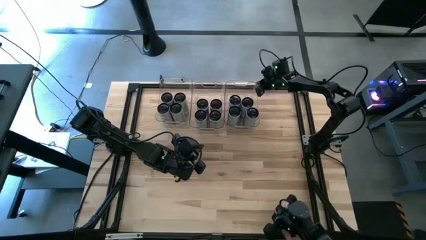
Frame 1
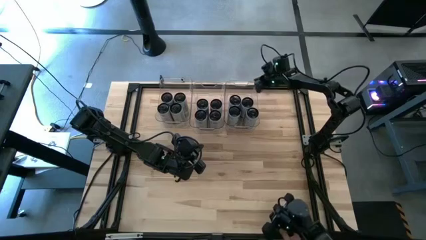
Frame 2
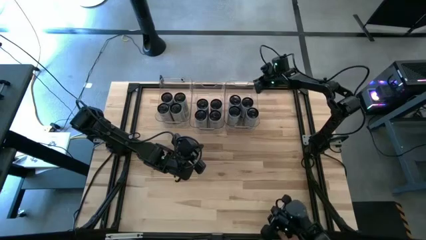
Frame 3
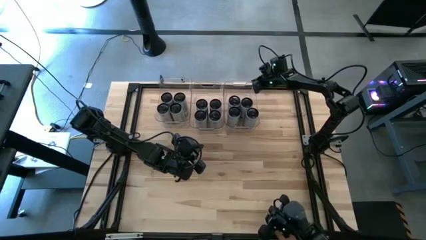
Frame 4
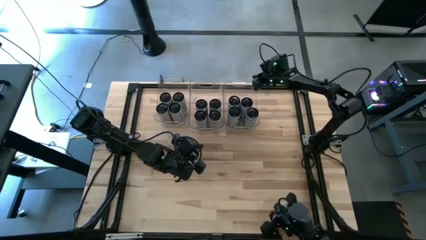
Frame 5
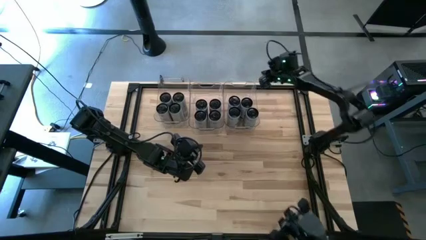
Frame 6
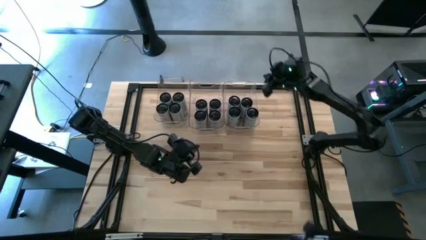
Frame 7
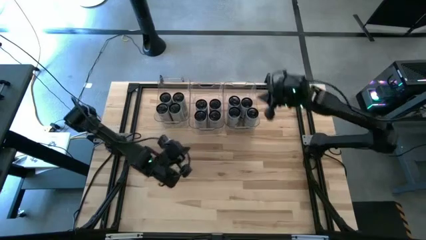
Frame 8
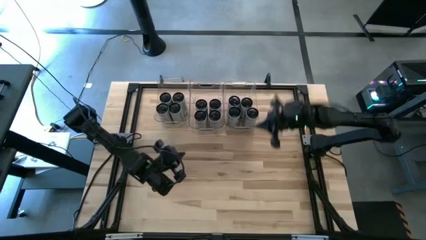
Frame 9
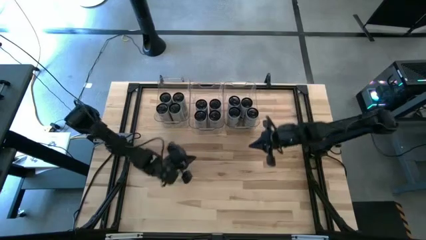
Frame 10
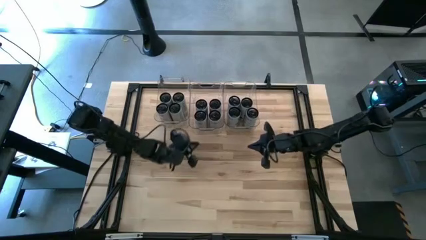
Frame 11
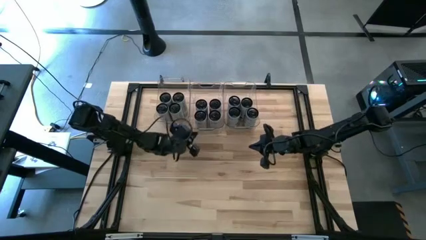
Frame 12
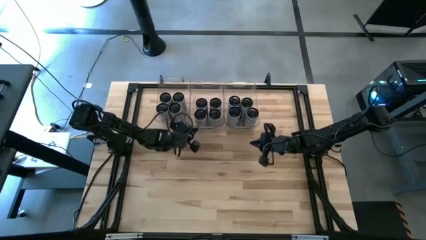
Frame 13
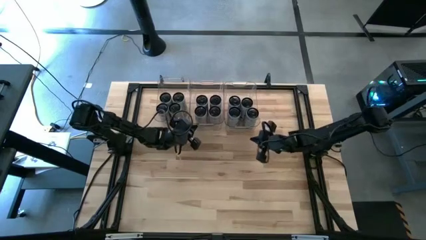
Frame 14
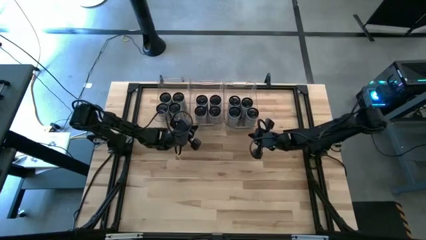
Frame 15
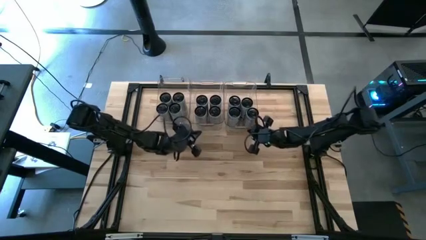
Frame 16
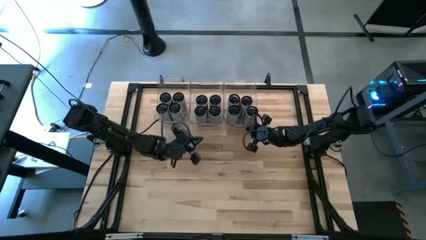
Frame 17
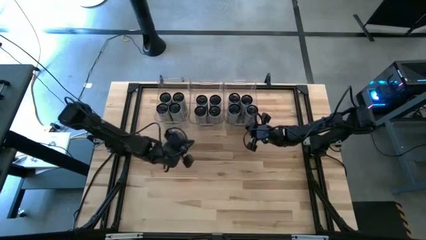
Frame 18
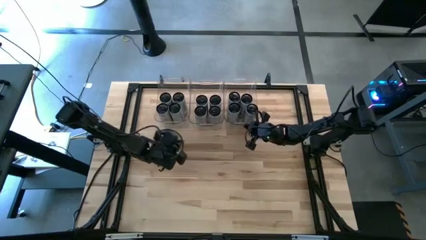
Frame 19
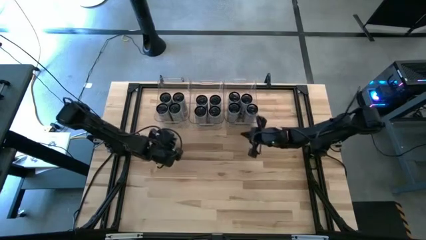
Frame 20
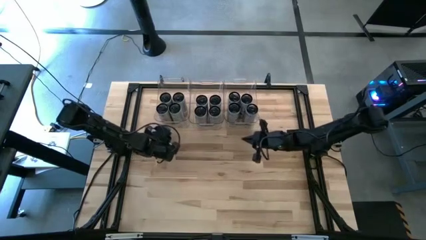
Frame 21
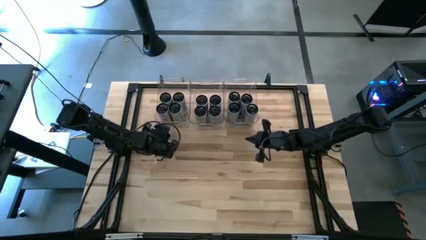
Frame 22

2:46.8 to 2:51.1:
Task: Sort soda cans
Adjust the transparent bins

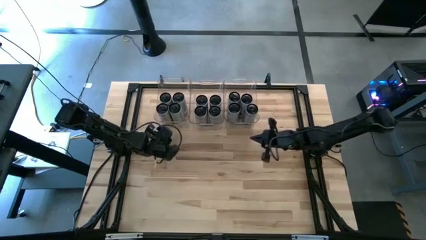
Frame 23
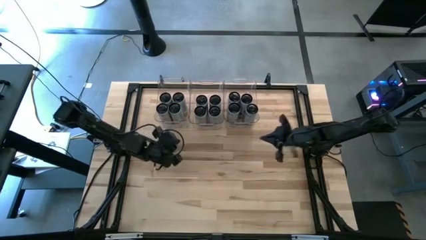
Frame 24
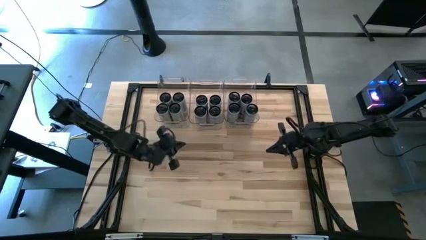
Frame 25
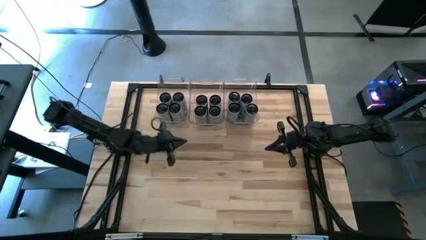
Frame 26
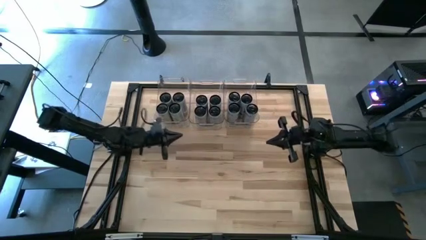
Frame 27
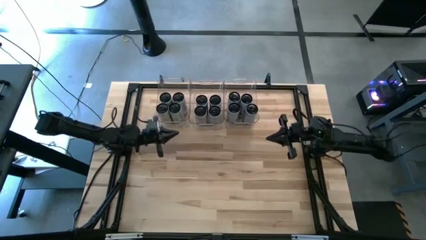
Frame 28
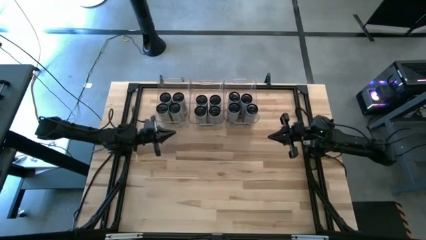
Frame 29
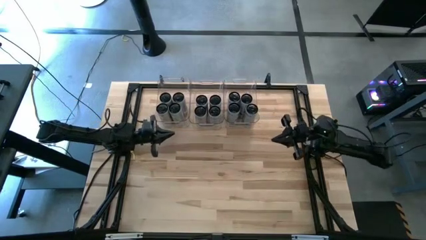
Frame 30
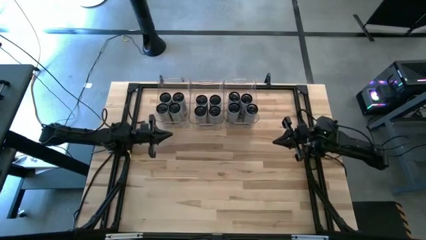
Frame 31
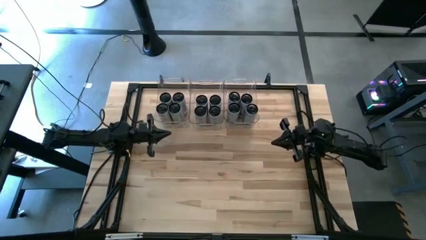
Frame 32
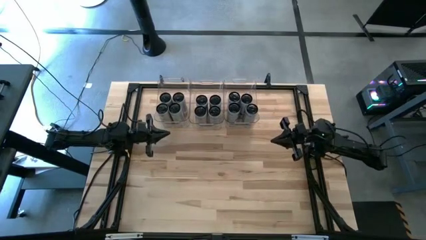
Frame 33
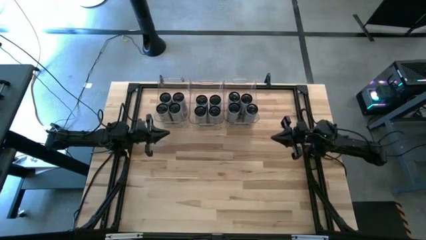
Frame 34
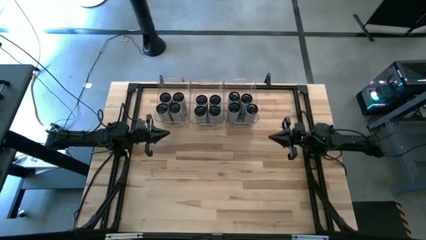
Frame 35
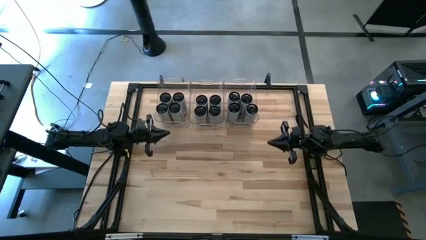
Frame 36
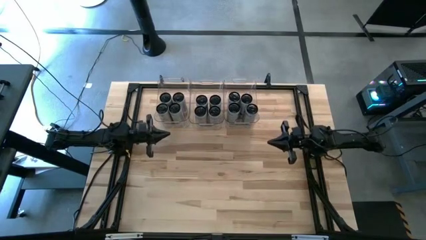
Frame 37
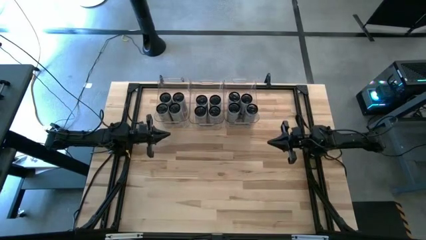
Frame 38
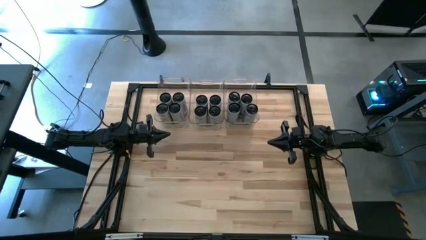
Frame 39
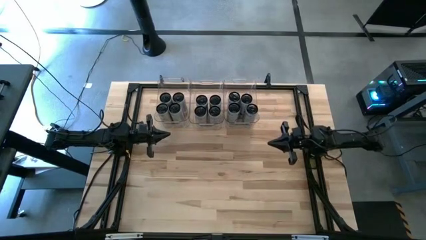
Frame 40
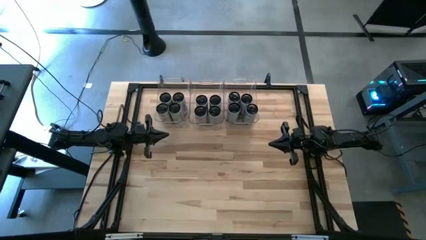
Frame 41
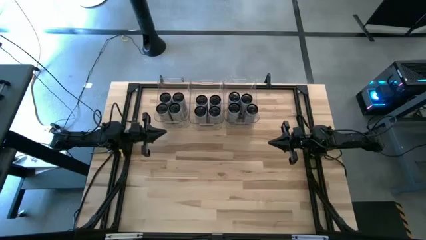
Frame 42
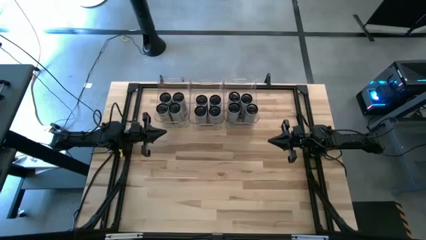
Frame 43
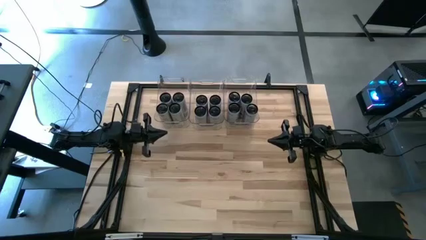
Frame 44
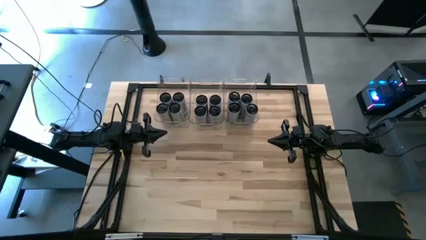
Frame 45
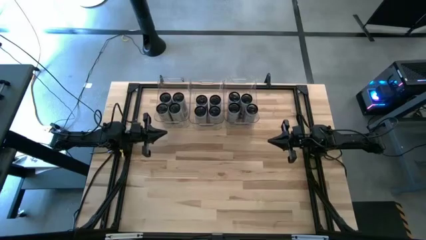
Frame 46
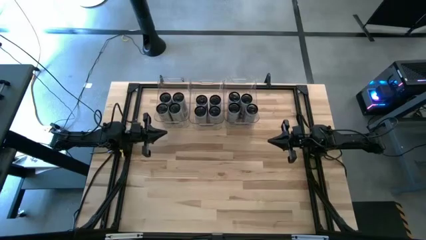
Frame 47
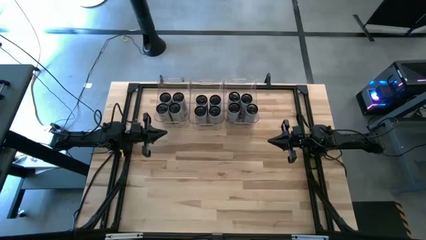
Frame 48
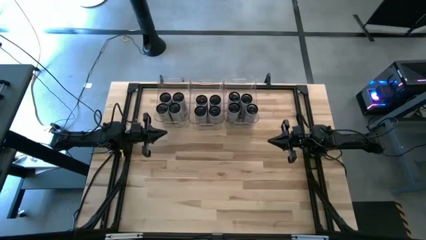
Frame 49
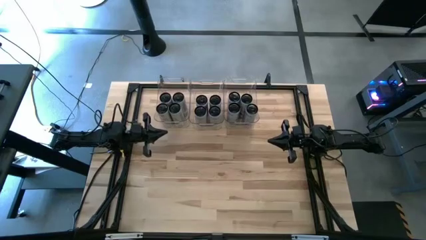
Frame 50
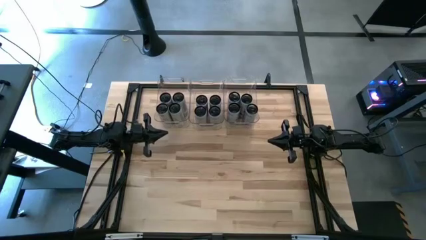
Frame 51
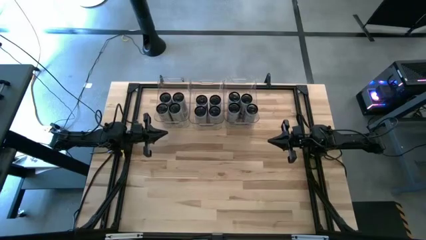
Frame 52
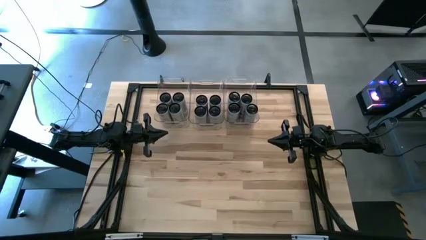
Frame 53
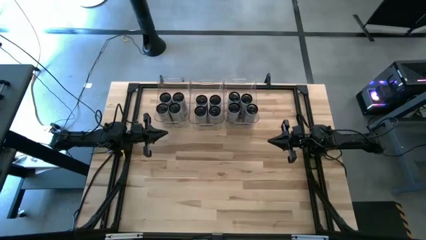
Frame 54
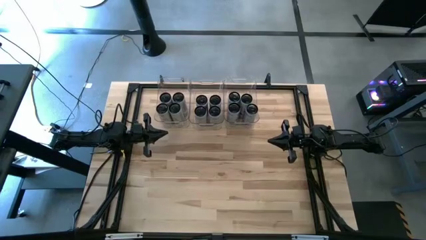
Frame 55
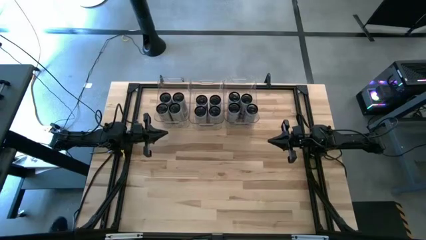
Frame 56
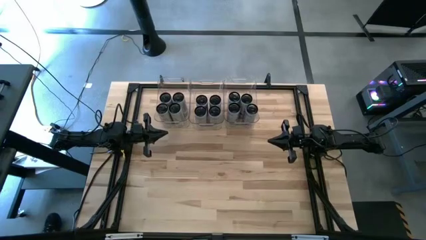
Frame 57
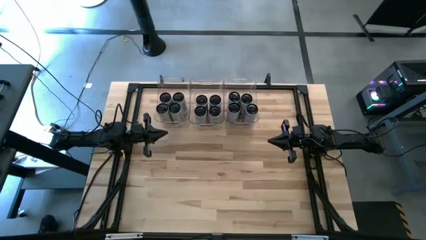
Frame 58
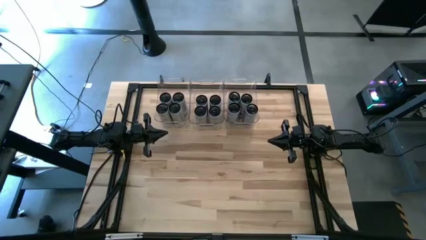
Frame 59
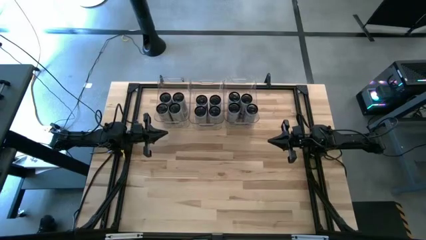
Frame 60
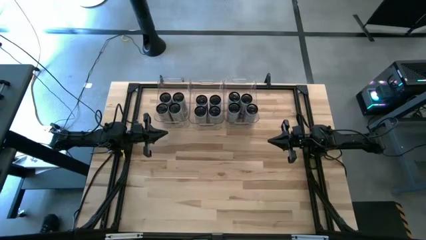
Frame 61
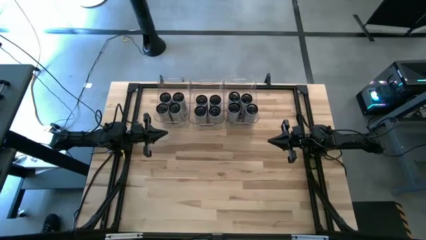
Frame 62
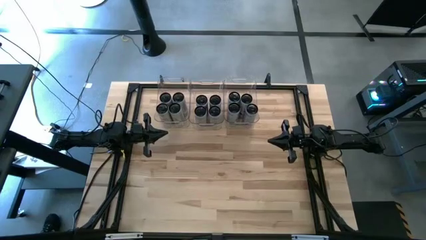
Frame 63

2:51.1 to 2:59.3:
Return to Home Position
